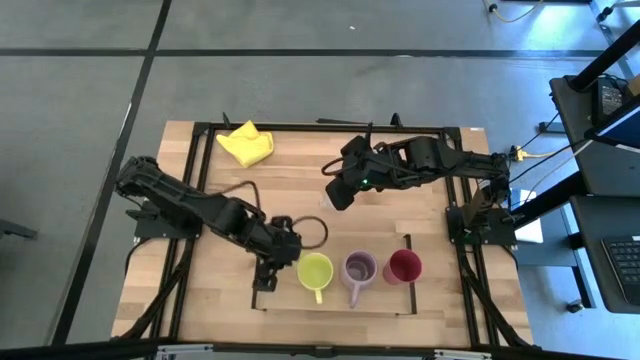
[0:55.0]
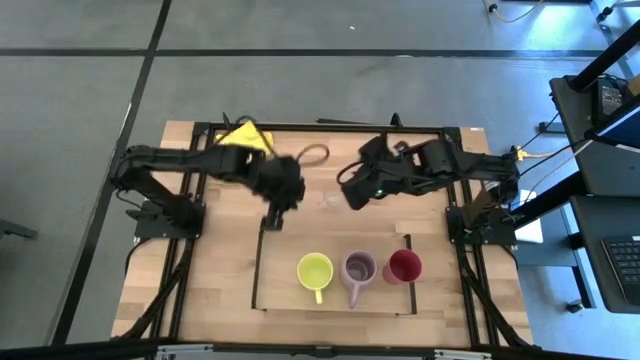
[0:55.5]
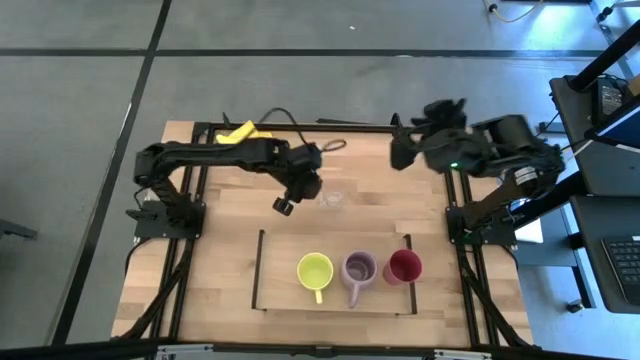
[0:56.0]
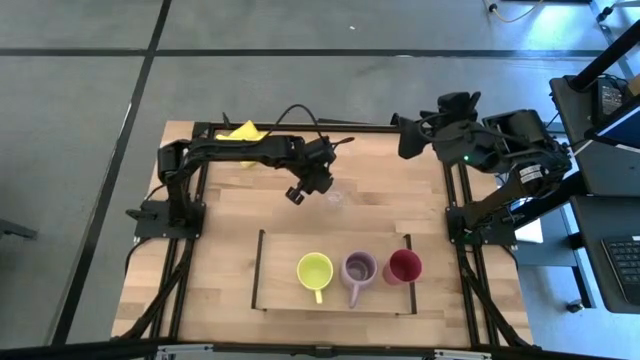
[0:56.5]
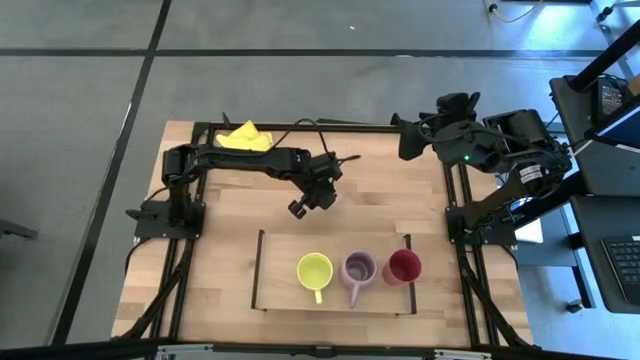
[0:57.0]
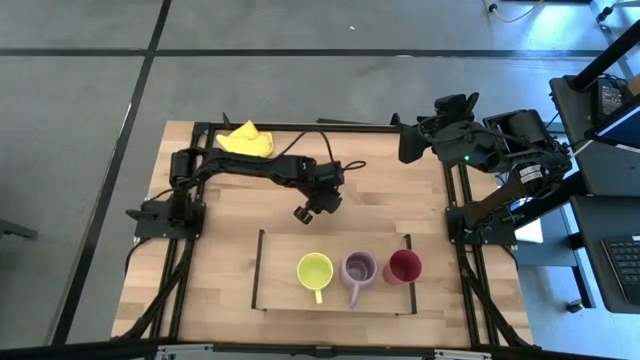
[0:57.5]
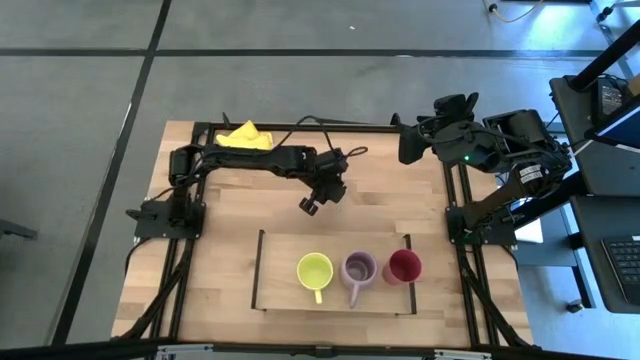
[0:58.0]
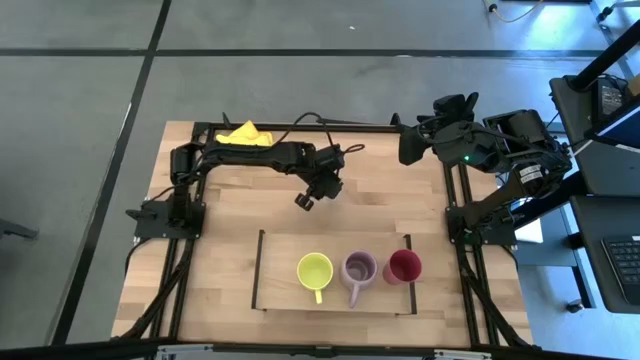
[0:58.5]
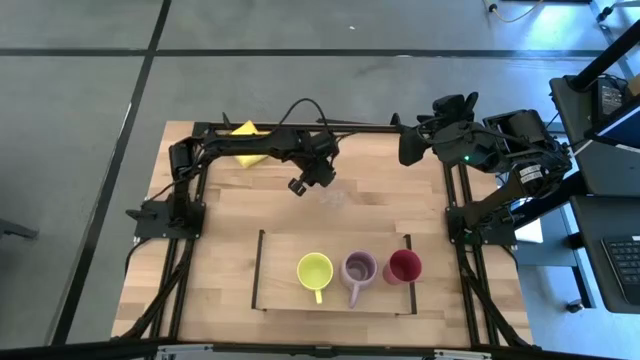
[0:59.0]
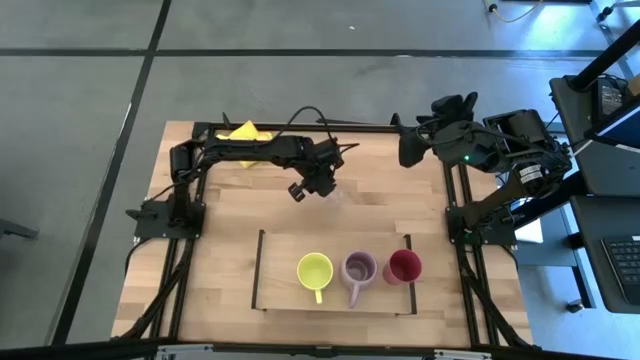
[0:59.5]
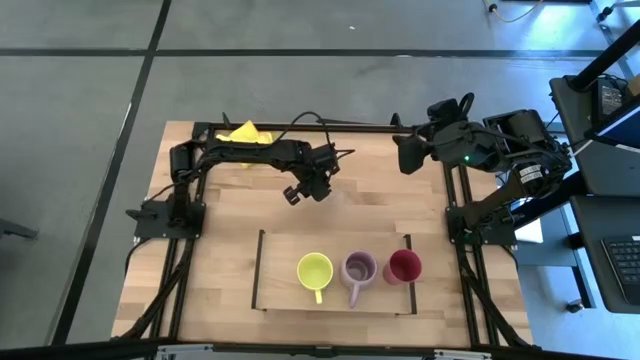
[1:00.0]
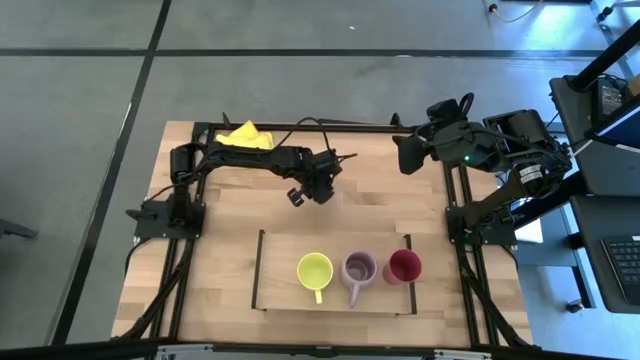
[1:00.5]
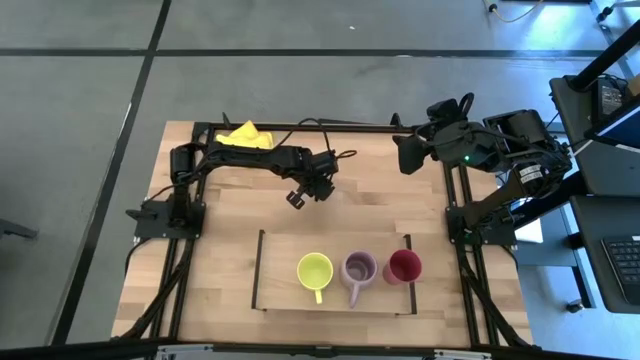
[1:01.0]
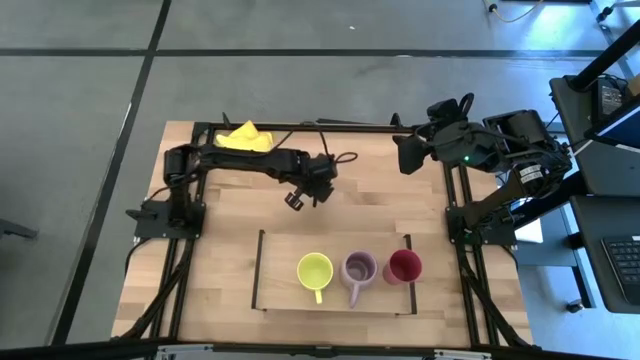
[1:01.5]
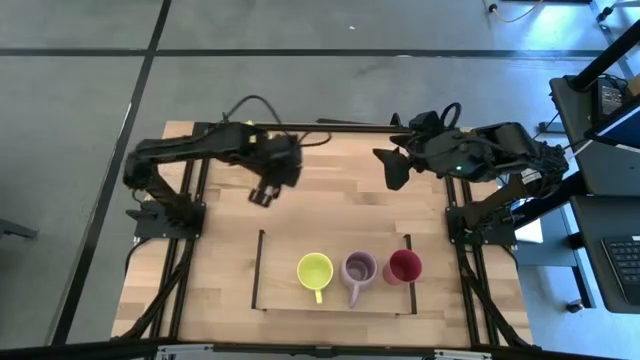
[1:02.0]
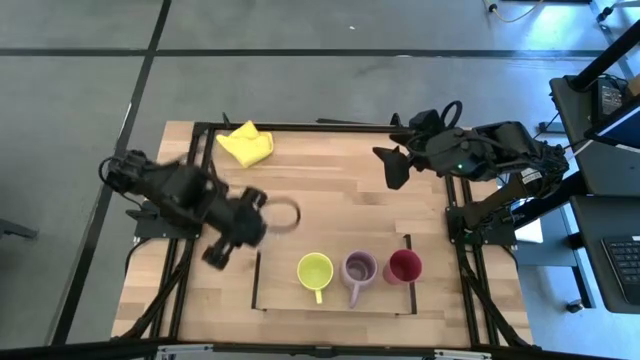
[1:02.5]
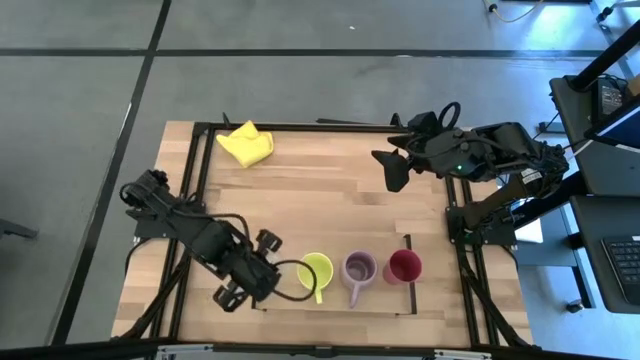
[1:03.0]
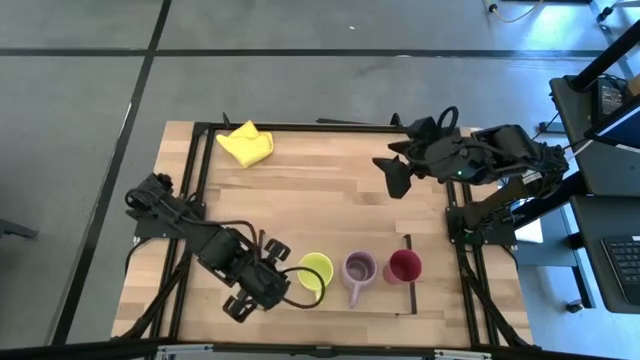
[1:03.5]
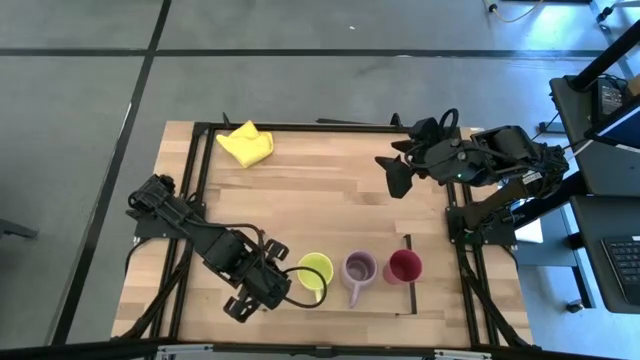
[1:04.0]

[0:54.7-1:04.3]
Task: Stack small to large cups/mugs on shelf
Put the transparent mug on the shelf

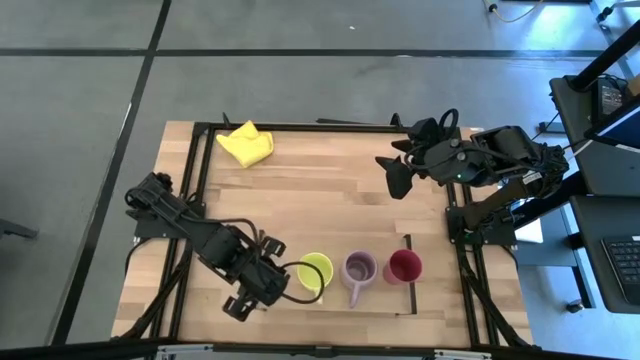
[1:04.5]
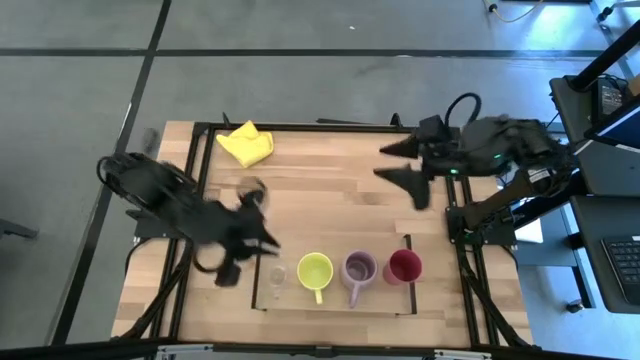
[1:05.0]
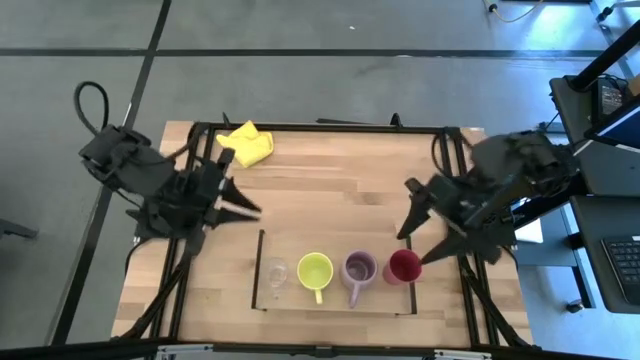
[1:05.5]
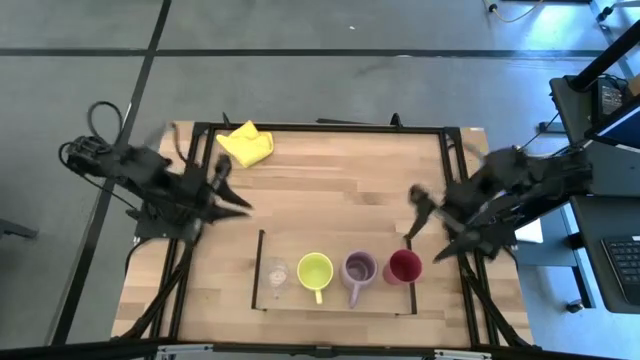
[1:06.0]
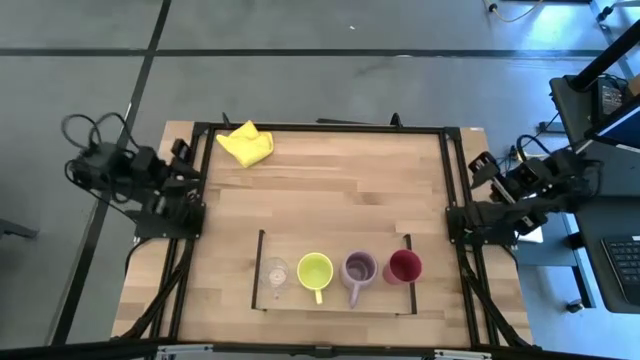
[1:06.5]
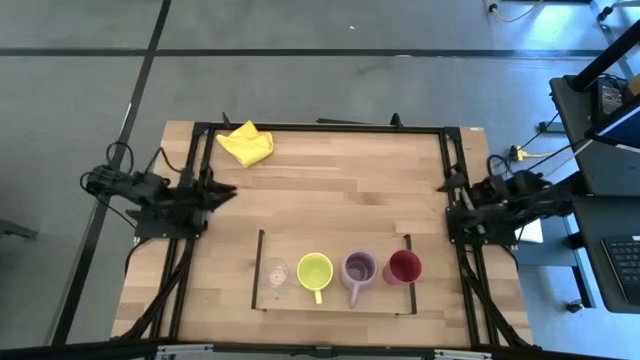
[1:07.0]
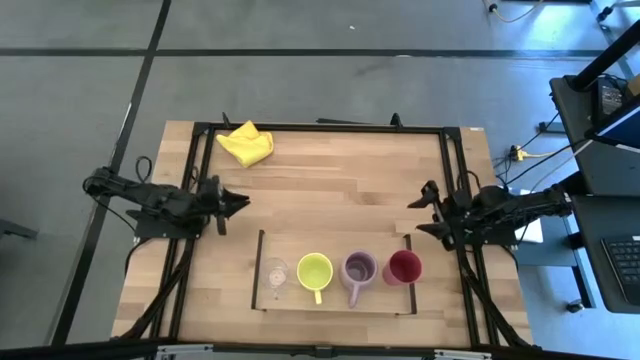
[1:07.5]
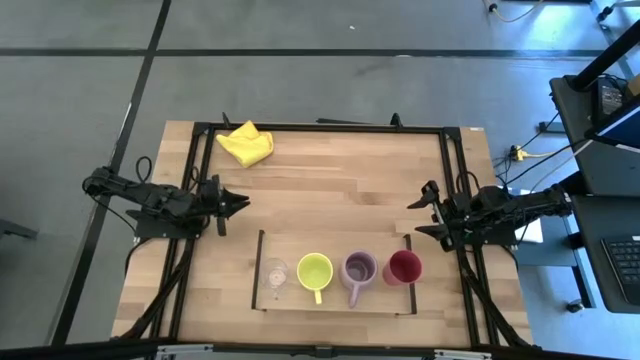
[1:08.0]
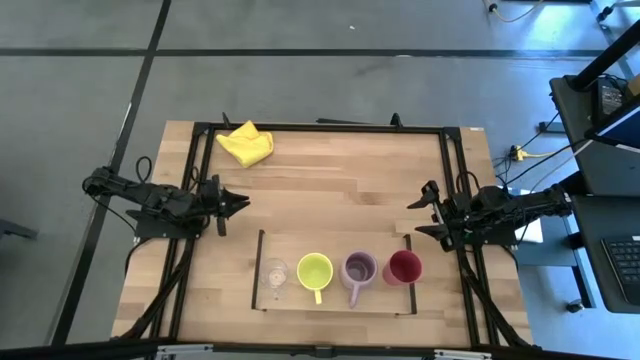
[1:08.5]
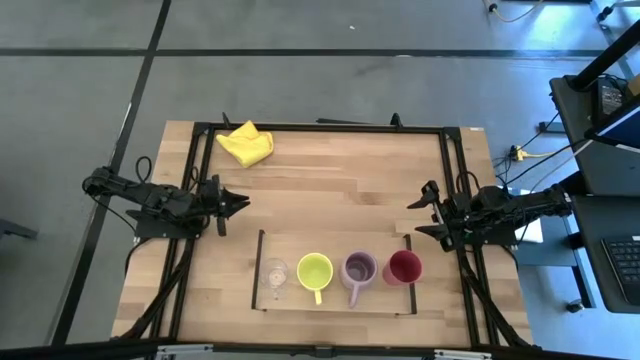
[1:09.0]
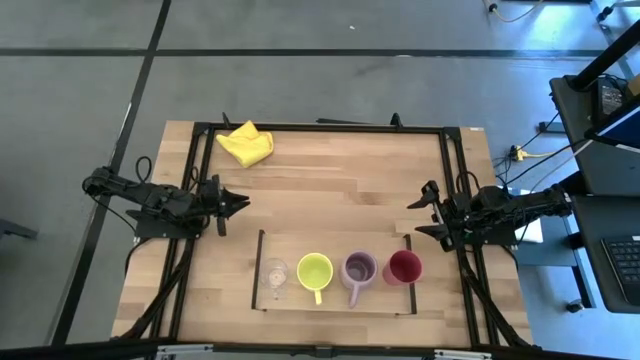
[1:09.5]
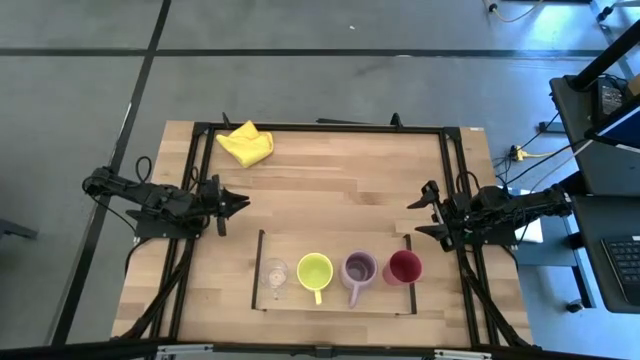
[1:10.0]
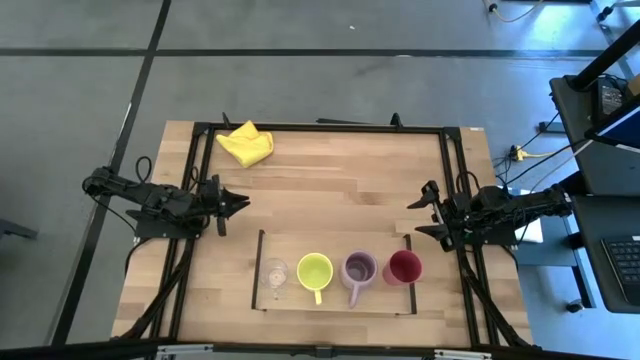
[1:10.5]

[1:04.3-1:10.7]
Return to Home Position
